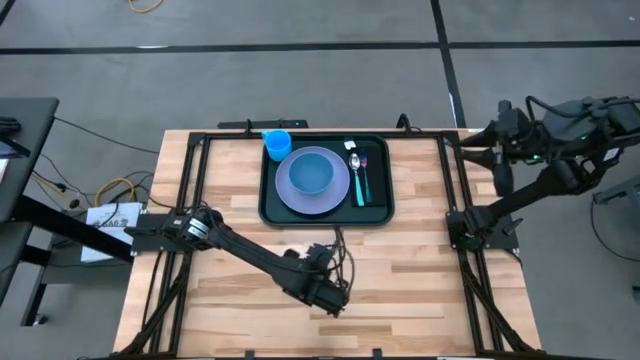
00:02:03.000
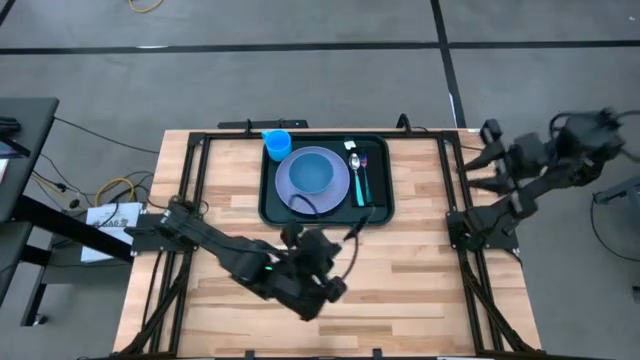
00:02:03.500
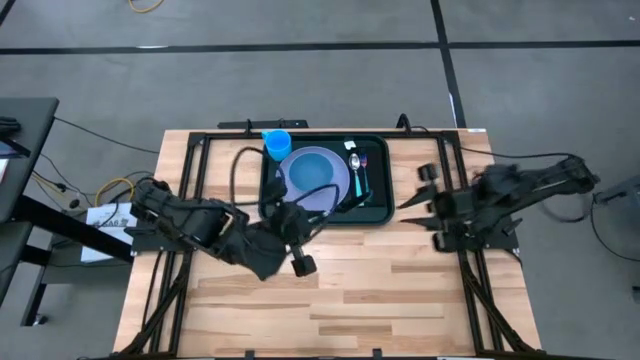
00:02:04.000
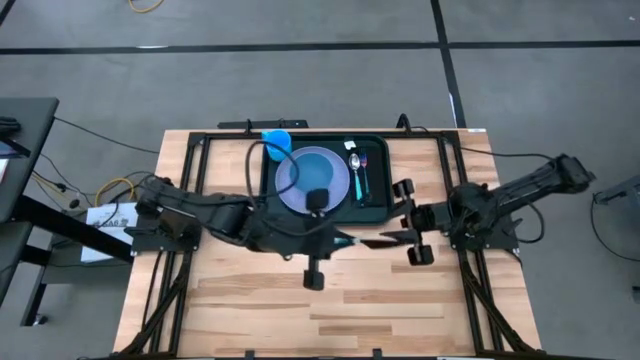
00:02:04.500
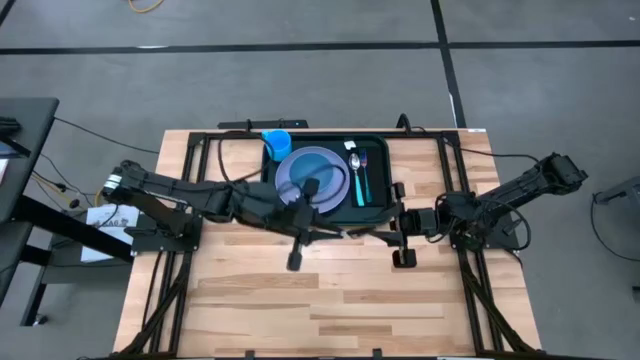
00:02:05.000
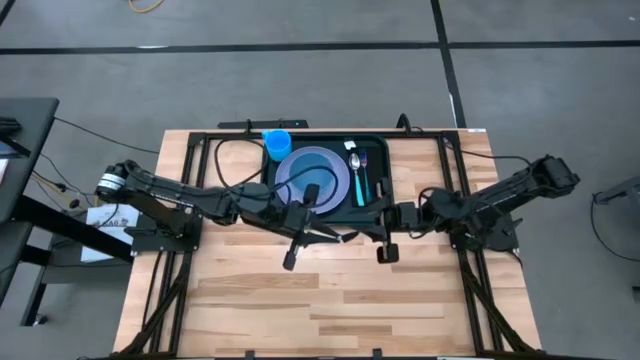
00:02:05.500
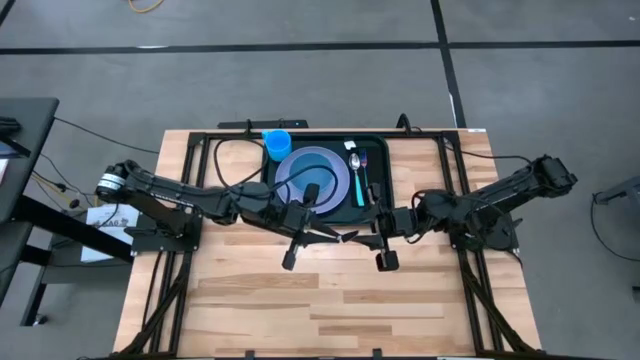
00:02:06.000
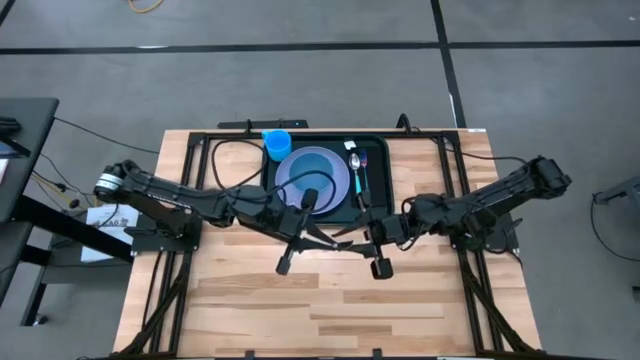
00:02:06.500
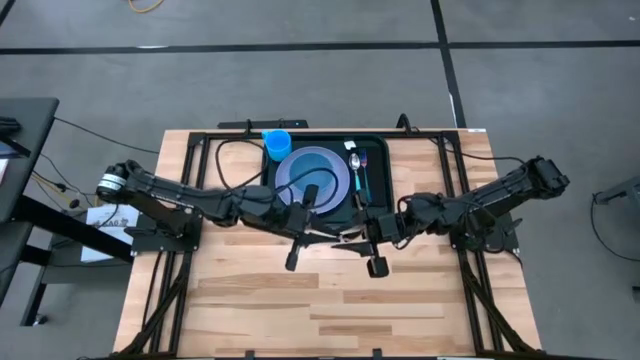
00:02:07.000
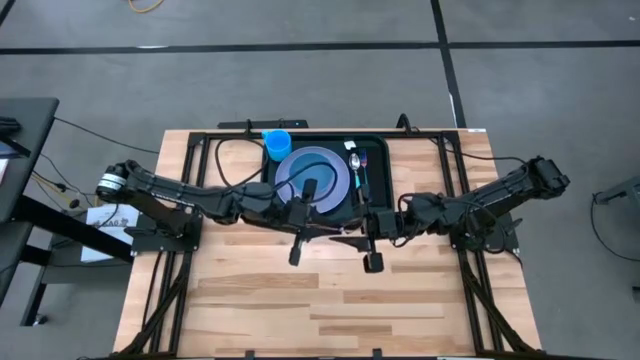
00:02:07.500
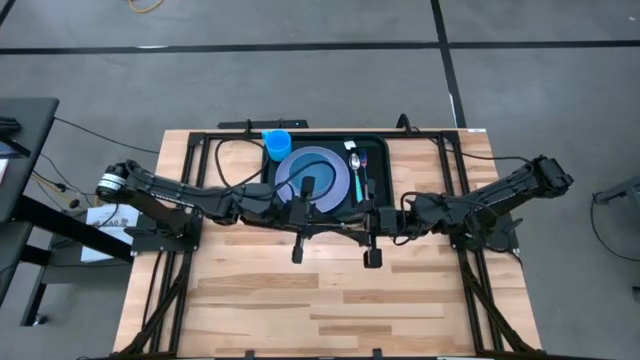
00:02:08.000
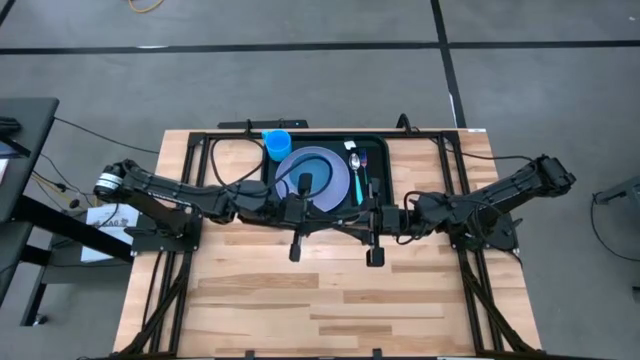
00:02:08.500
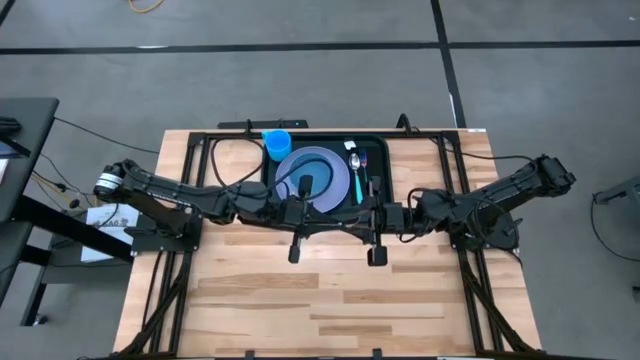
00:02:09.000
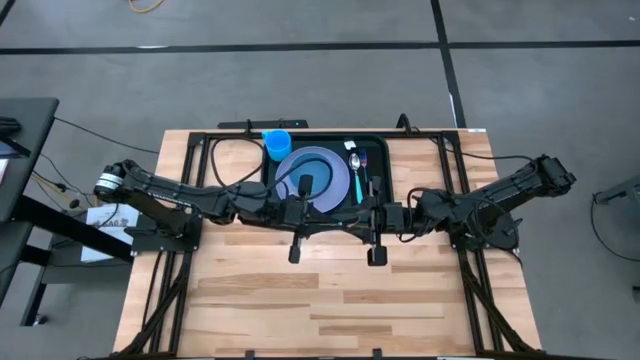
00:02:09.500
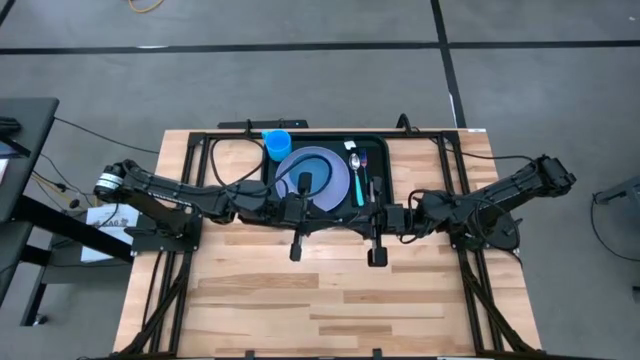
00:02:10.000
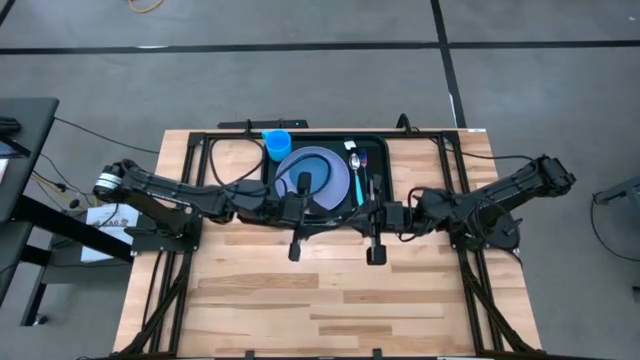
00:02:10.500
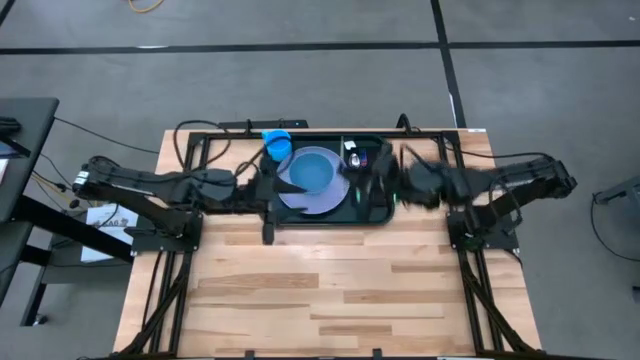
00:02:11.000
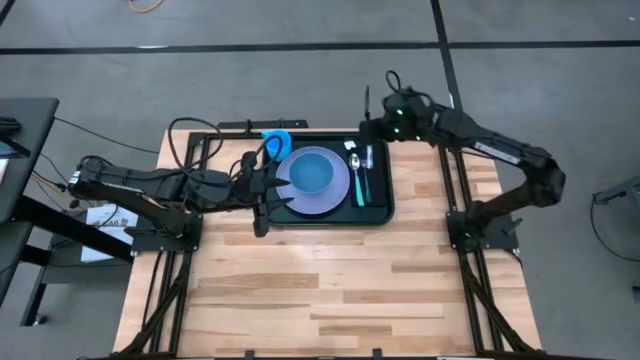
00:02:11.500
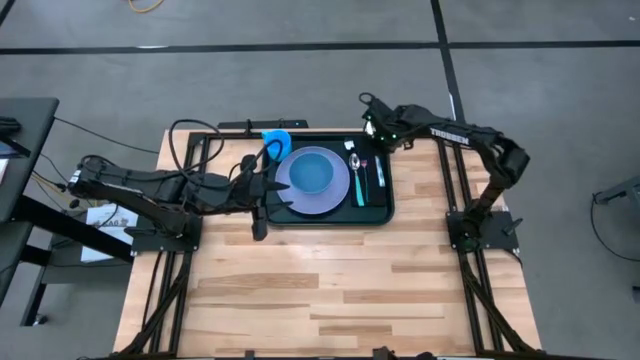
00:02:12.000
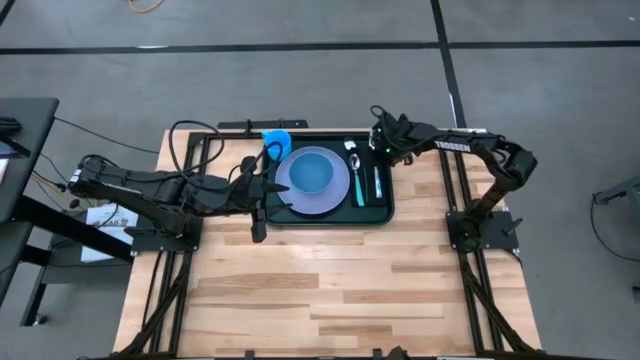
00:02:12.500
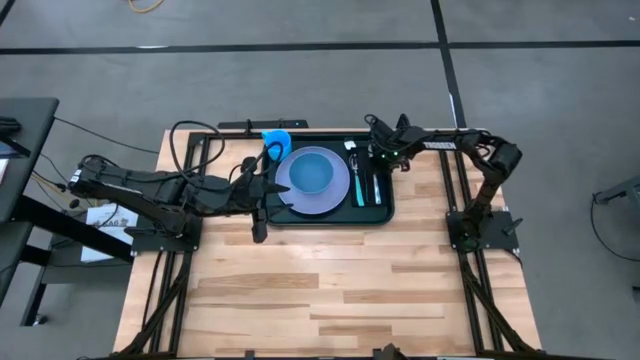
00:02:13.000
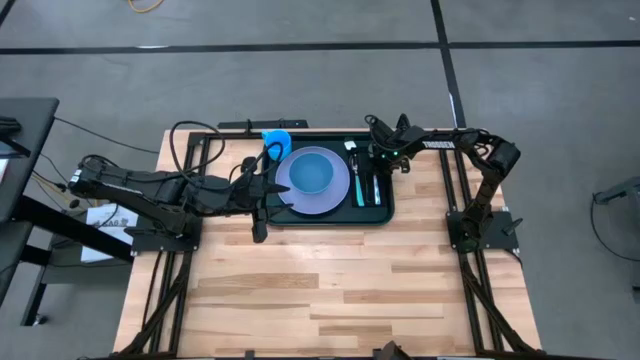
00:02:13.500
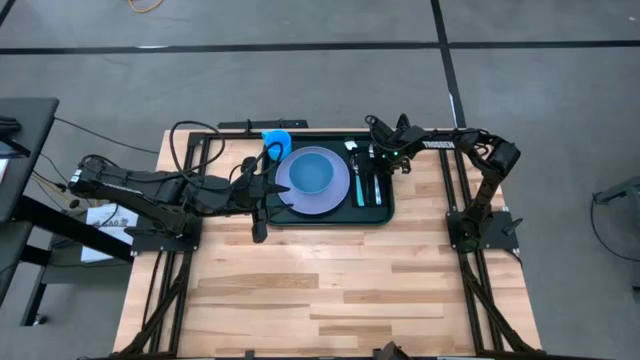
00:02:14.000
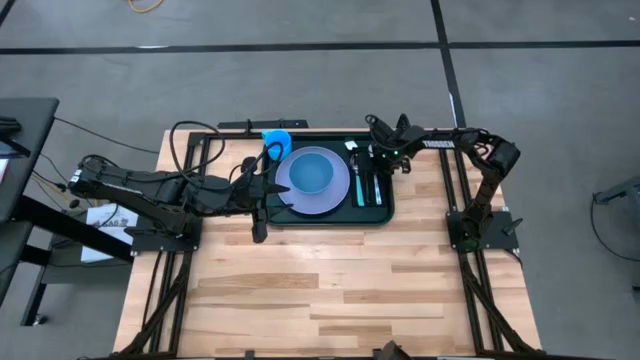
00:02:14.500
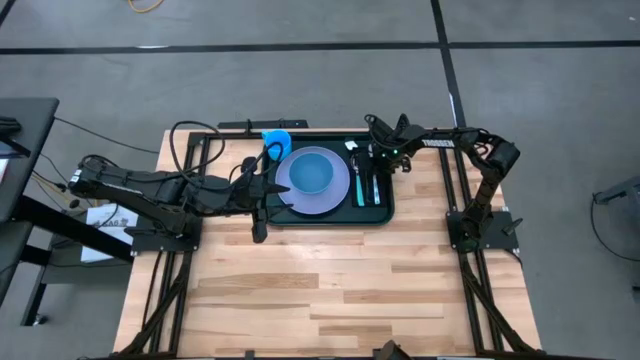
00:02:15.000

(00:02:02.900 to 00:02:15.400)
Task: Set up tray
Put the knife on top of the table napkin to the right of the fork on the tray

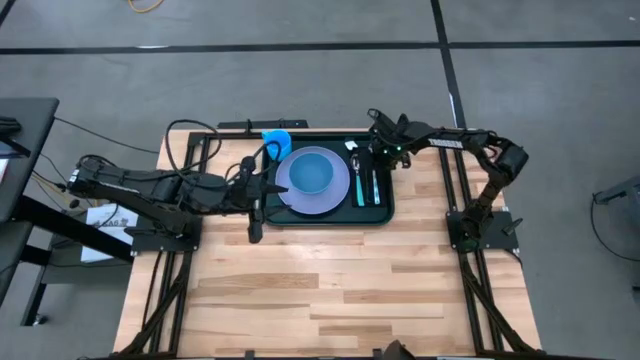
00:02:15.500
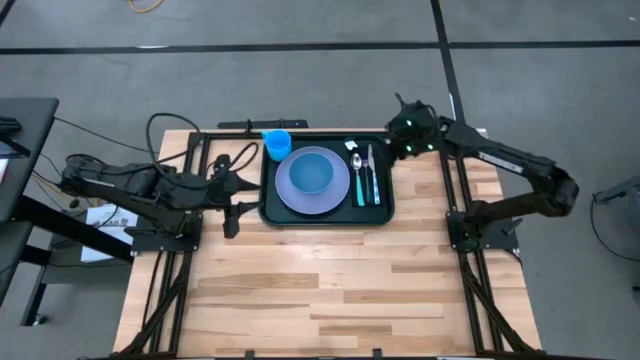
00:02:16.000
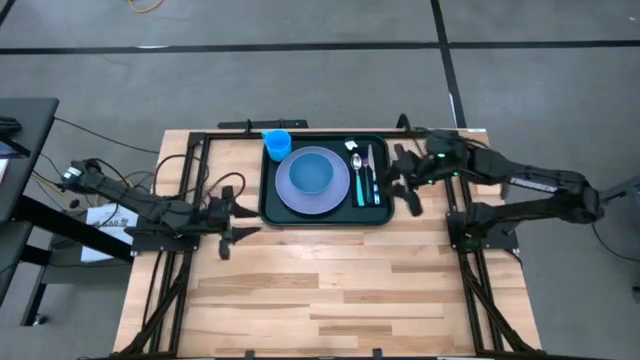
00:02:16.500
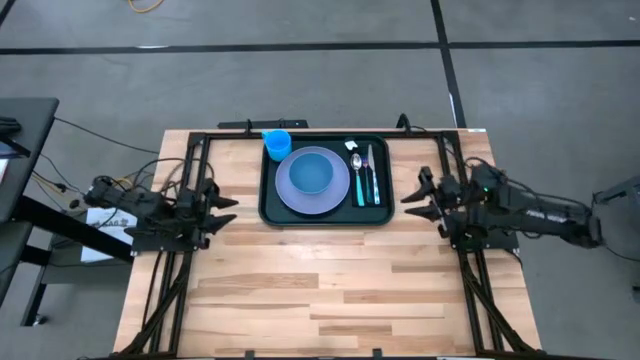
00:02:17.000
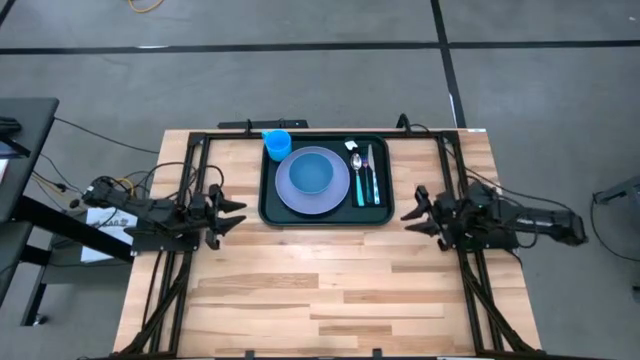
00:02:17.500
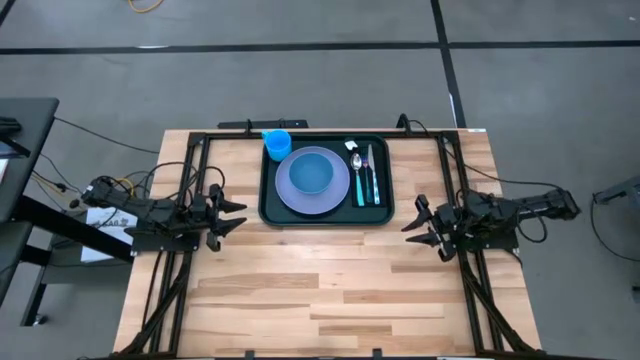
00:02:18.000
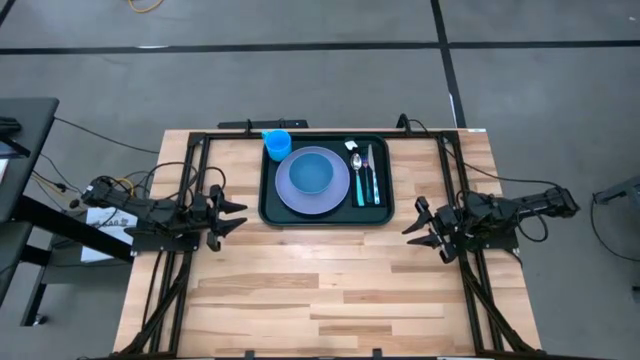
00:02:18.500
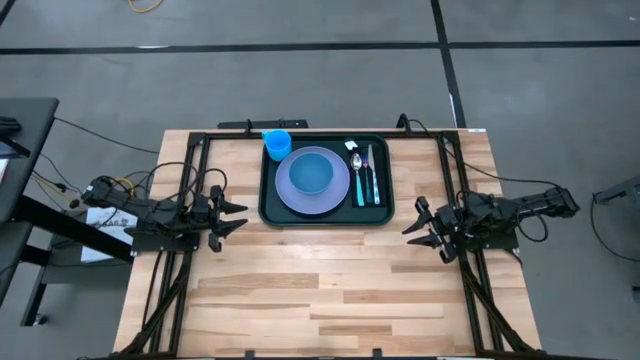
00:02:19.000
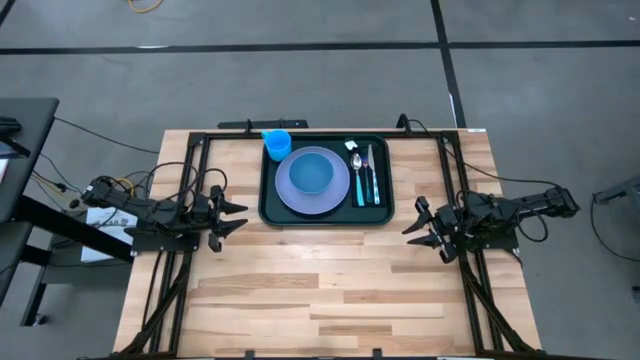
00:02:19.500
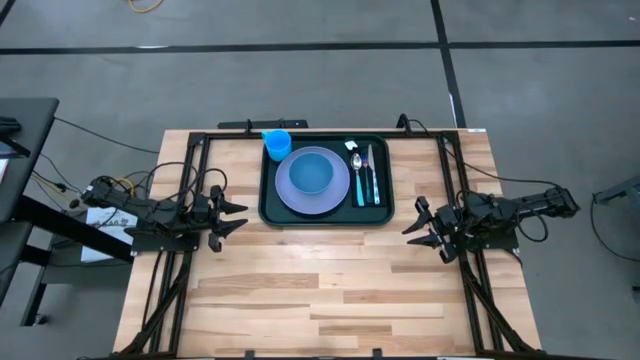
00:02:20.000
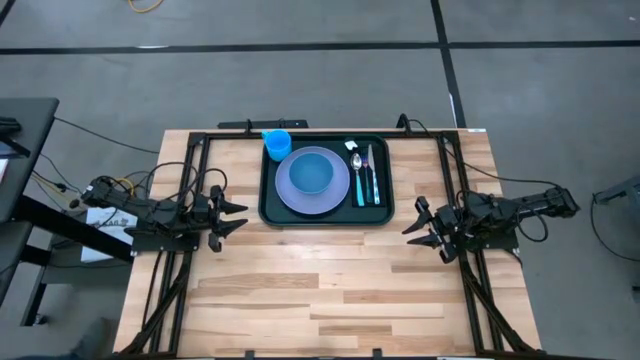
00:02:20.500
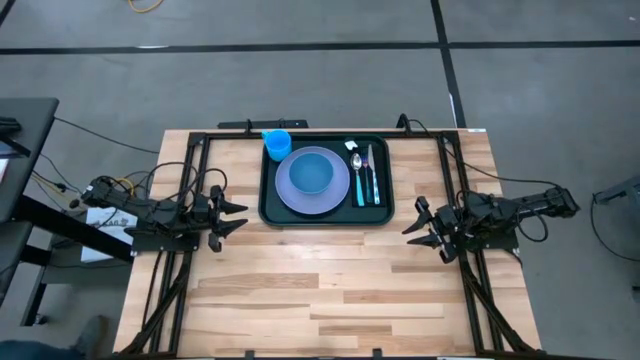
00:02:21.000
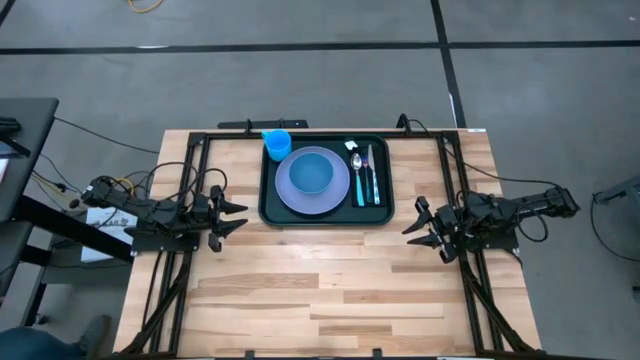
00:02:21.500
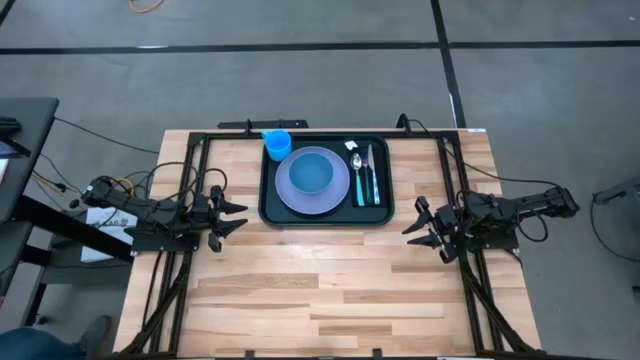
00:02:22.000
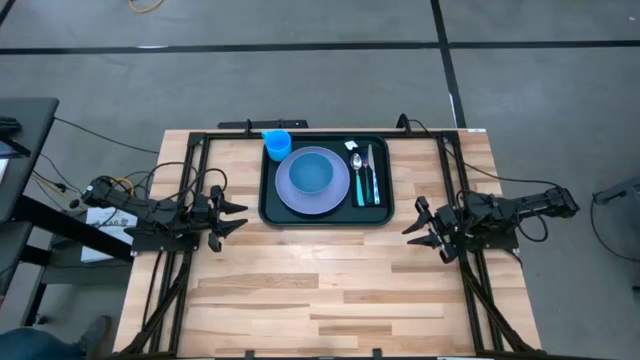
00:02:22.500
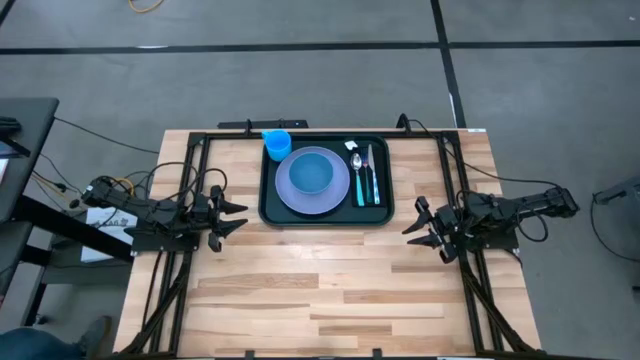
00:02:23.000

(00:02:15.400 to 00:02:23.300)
Return to Home Position
